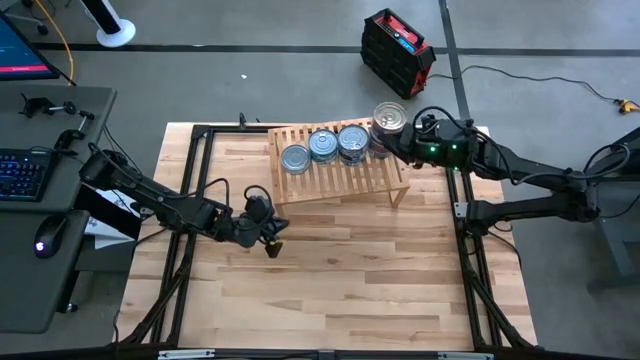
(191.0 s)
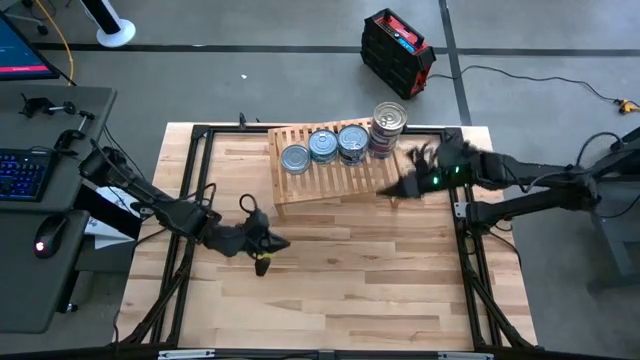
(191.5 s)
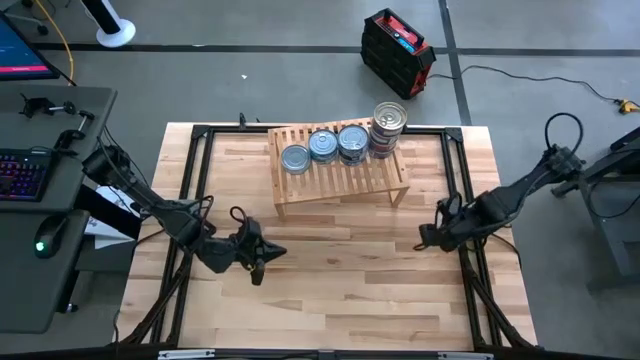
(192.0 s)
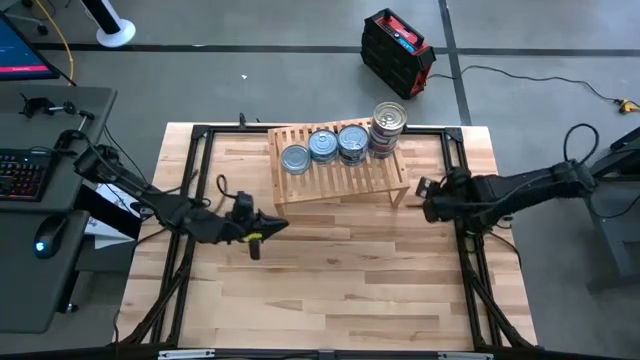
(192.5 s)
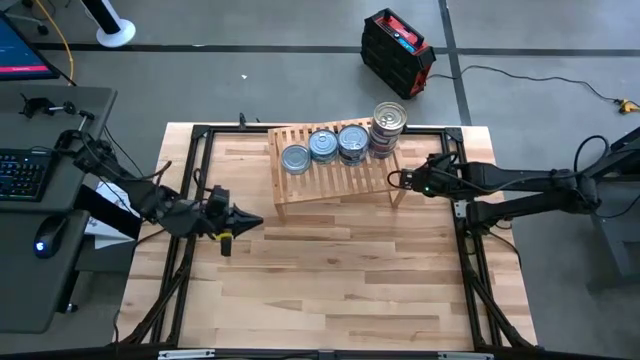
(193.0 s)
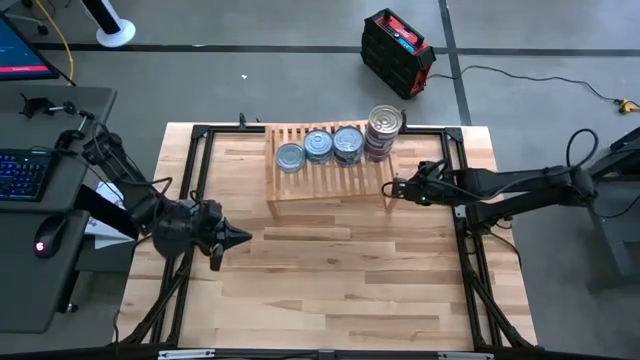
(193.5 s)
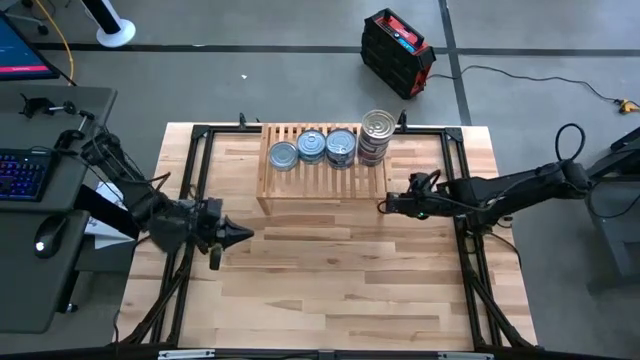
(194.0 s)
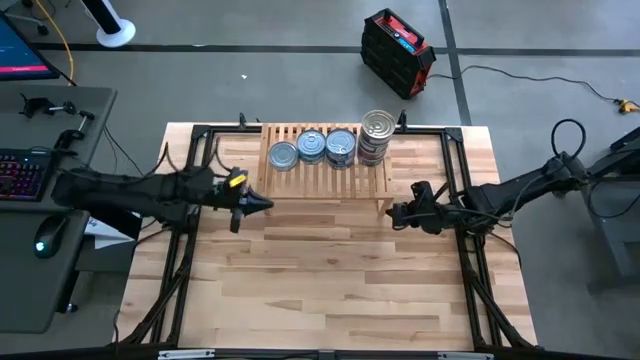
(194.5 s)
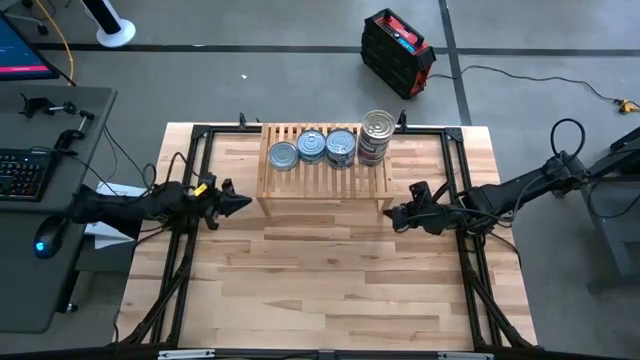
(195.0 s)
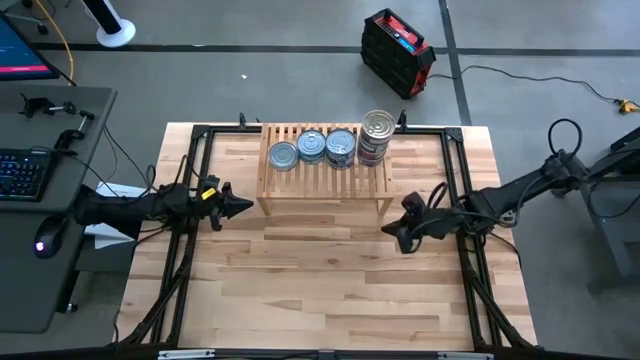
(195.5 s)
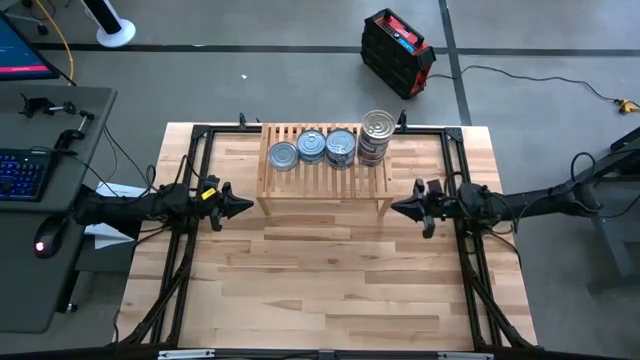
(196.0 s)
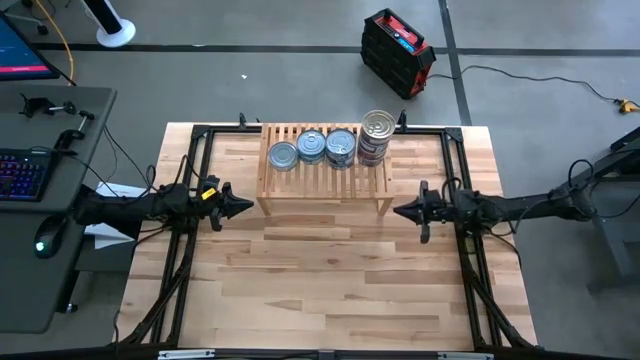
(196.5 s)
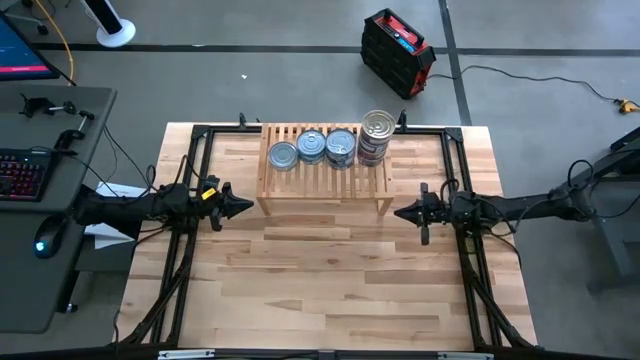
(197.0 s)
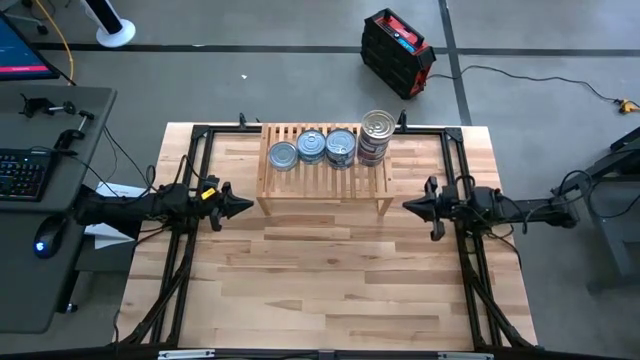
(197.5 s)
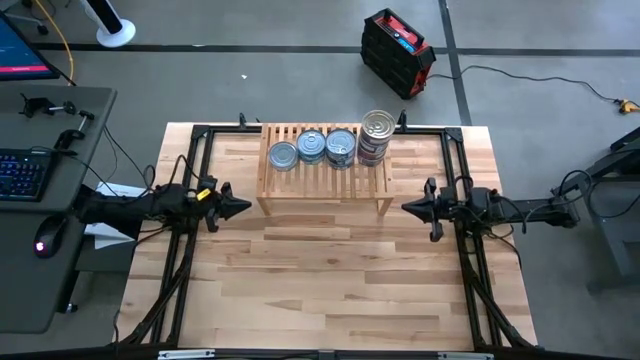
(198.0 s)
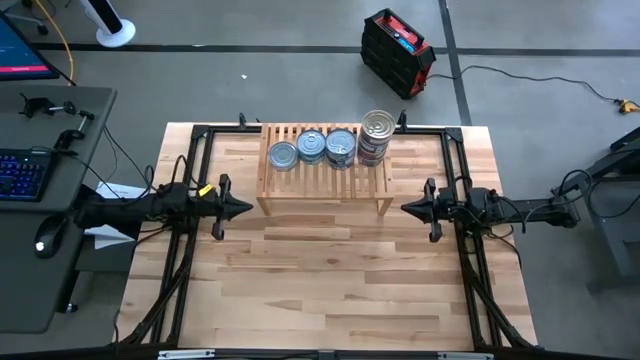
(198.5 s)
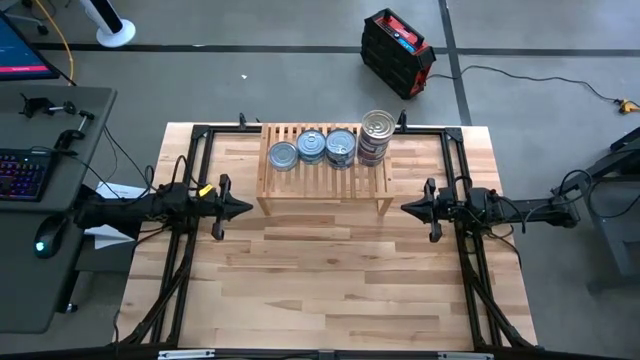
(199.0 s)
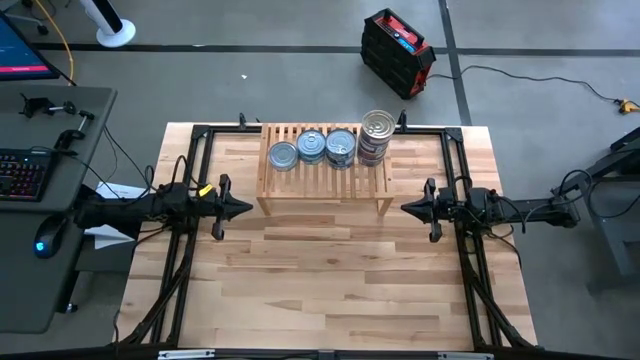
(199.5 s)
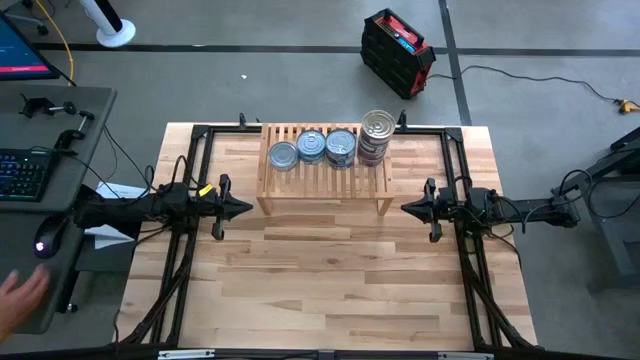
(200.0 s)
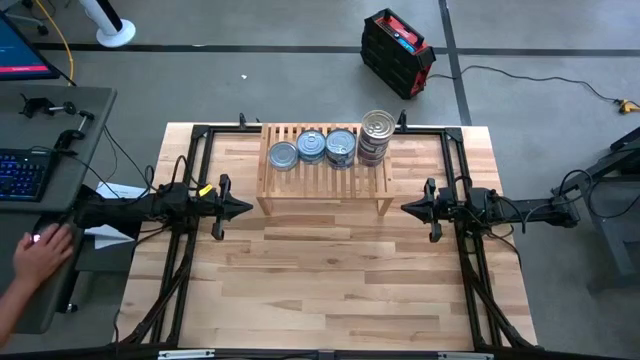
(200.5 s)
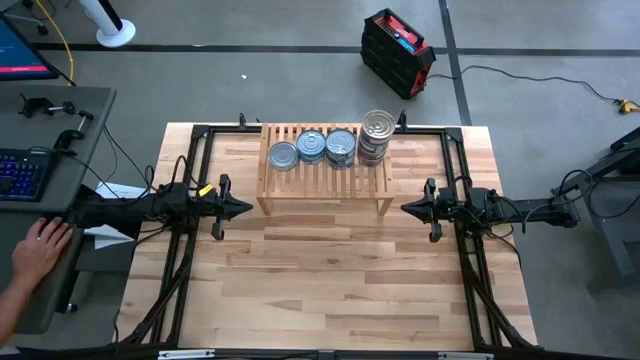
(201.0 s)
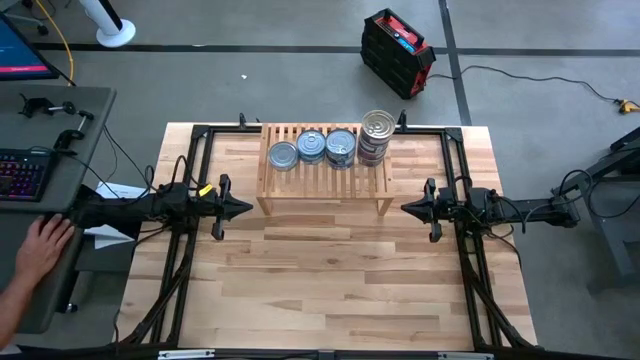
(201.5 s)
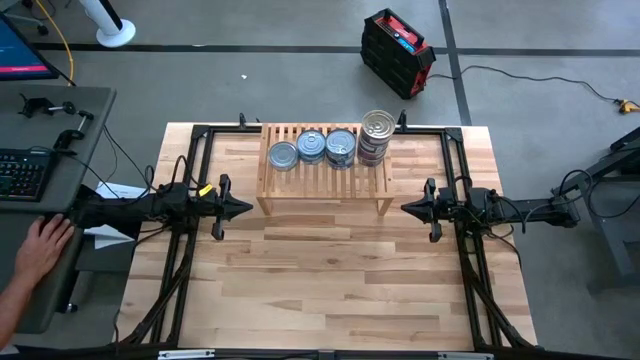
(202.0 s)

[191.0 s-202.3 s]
Task: Stack canned seafood by type on shelf
Return to Home Position

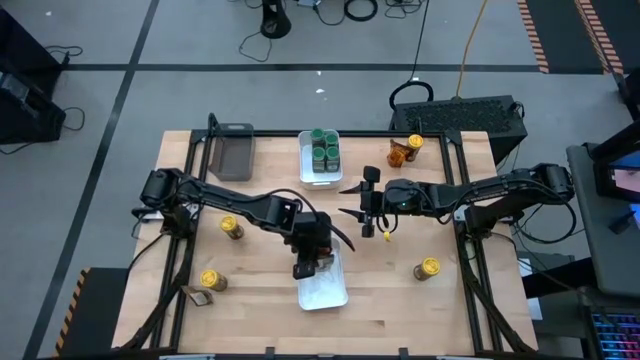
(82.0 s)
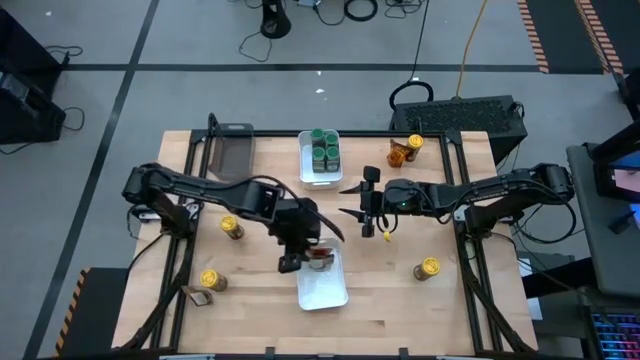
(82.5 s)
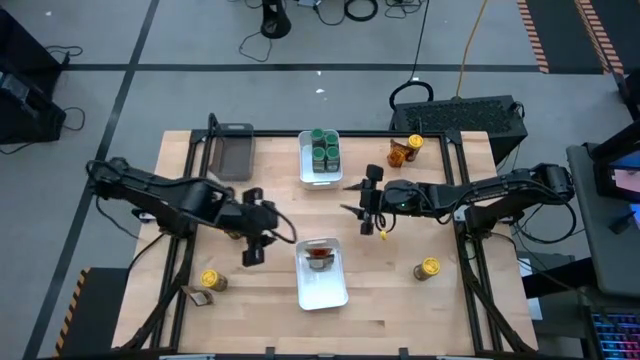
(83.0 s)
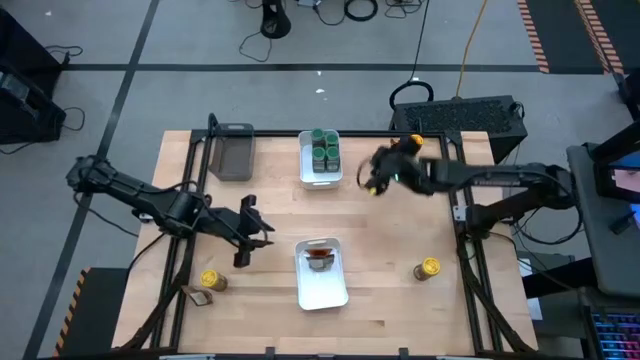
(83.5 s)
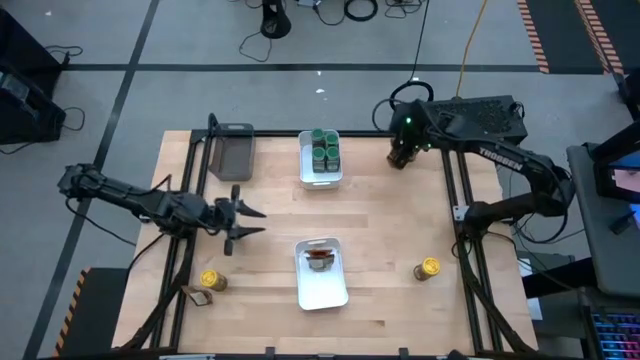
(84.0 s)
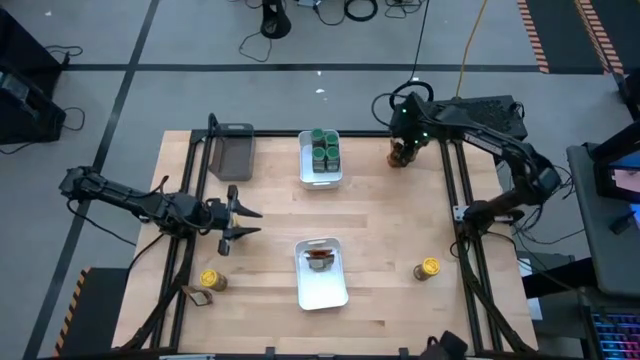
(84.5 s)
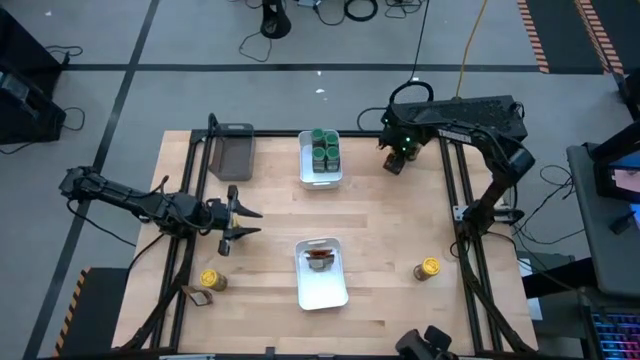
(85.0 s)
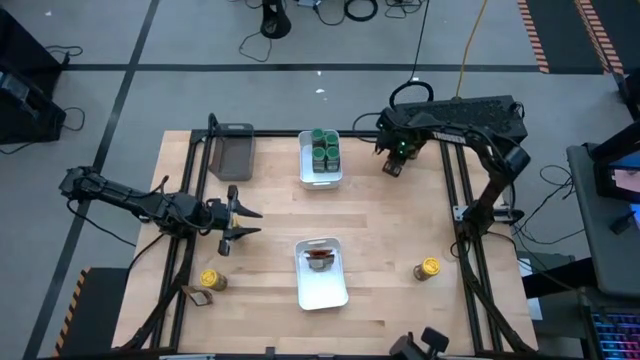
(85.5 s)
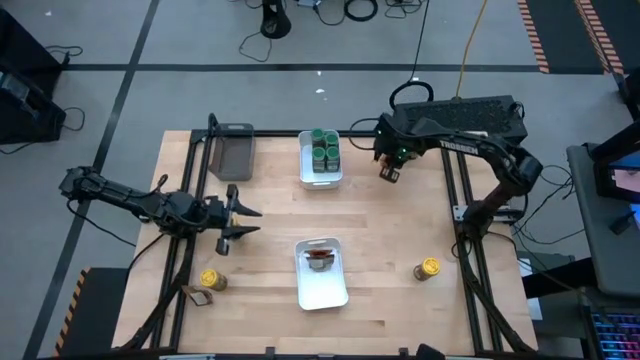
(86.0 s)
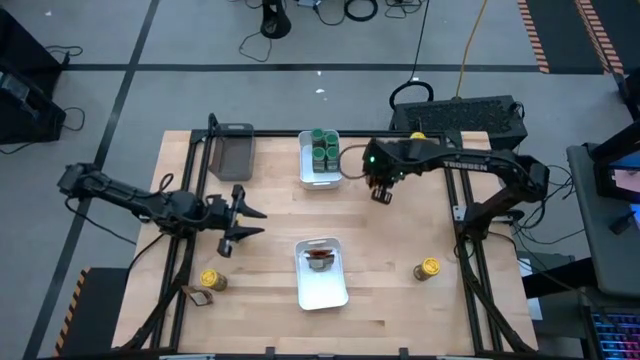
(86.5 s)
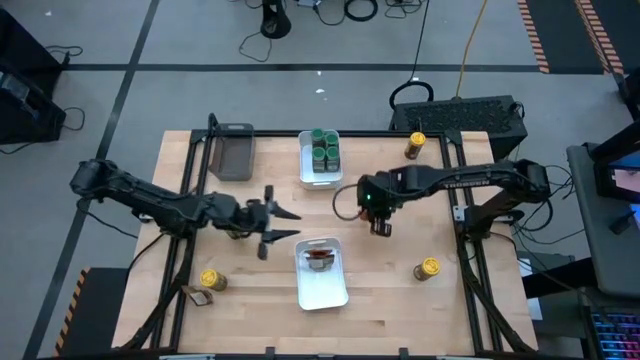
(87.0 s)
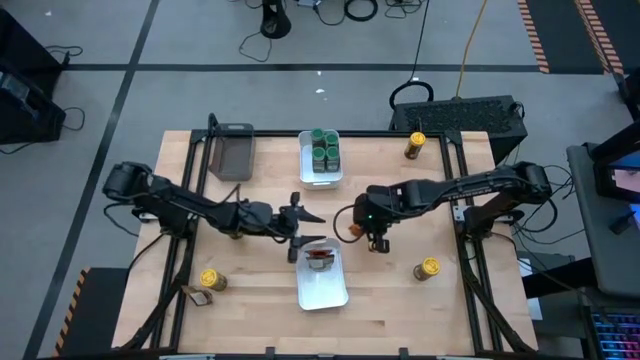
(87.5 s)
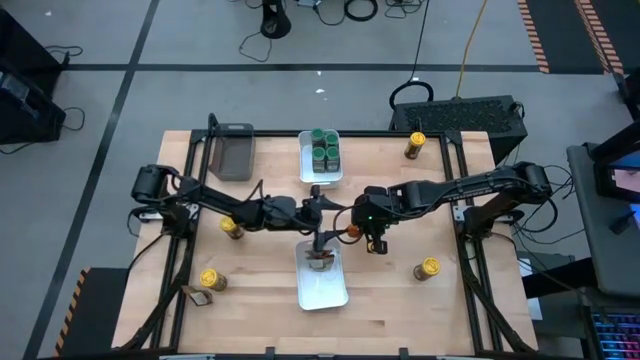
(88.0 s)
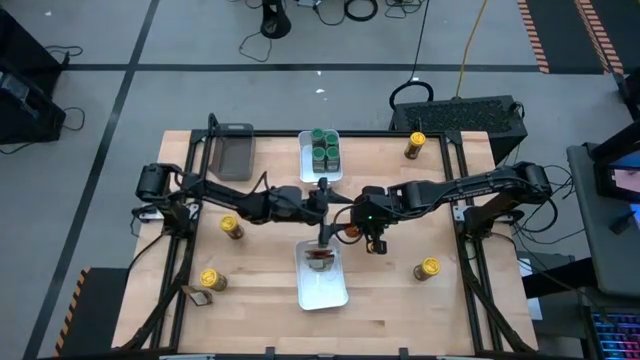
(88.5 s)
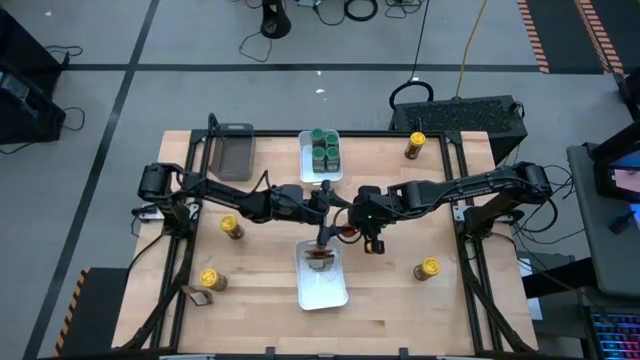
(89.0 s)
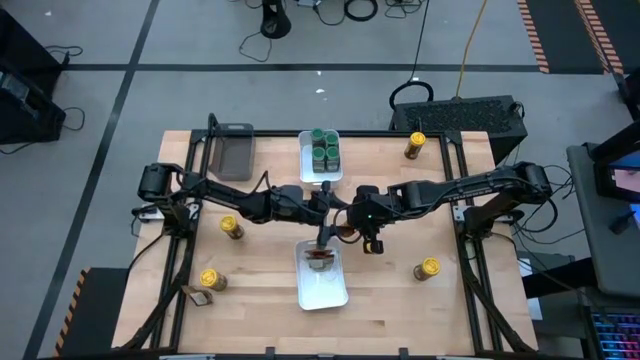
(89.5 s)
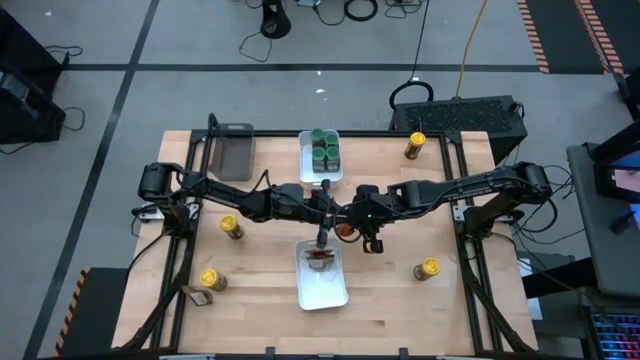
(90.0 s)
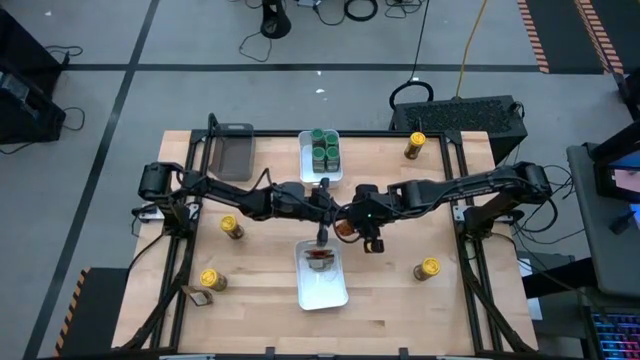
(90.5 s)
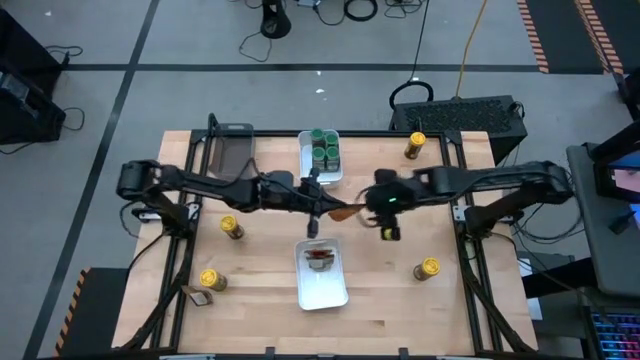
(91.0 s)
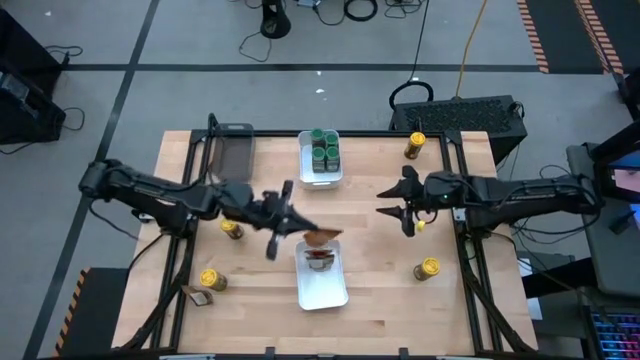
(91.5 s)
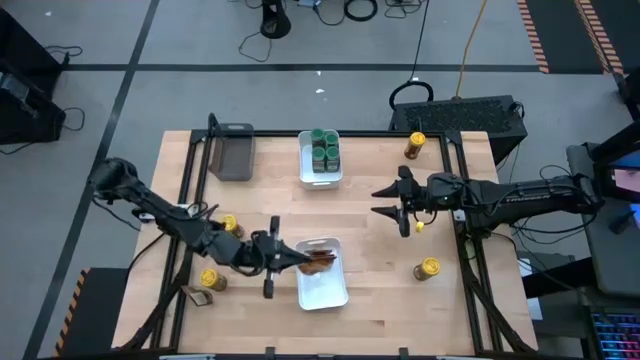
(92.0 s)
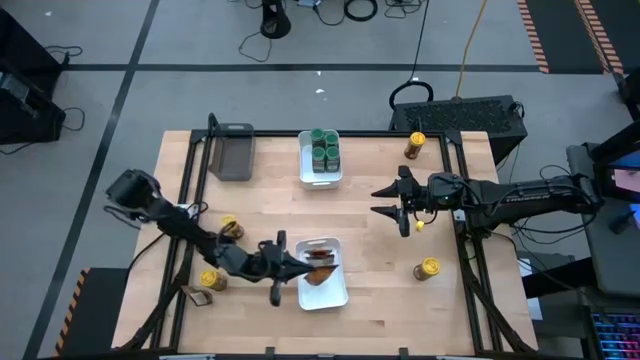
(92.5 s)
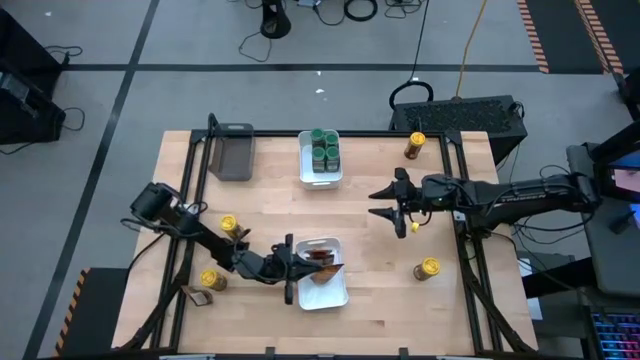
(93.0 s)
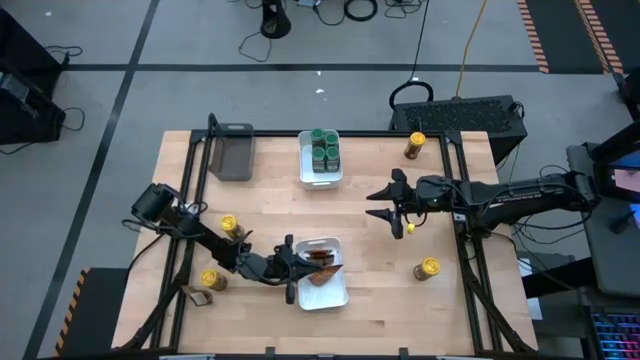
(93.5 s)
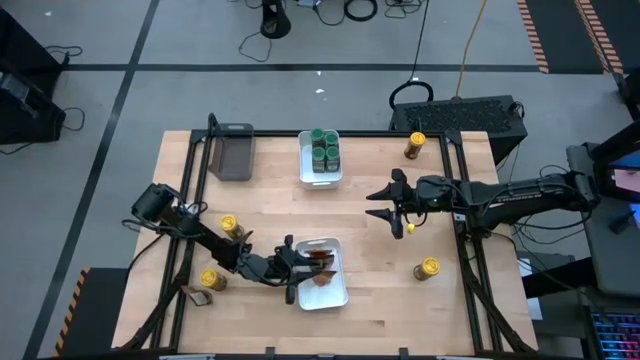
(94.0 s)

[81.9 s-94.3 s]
Task: Sort spices by type
Put the top brown spice pack into the bottom white bin
